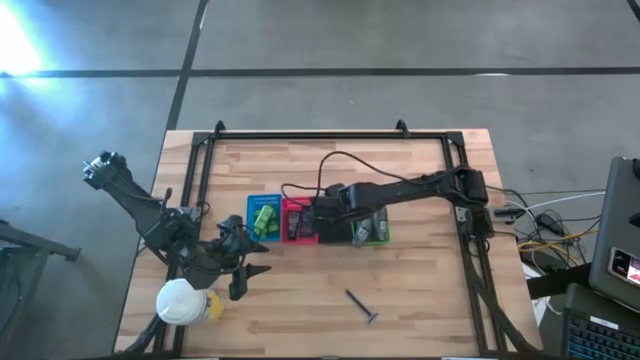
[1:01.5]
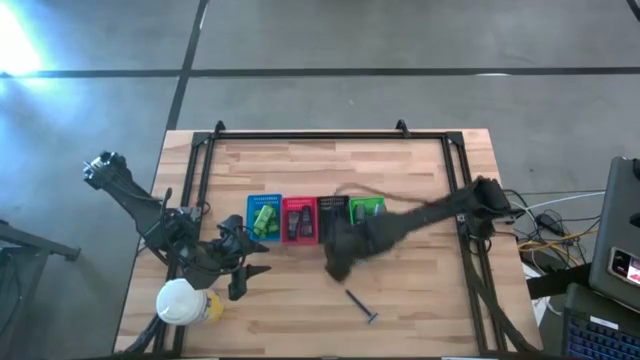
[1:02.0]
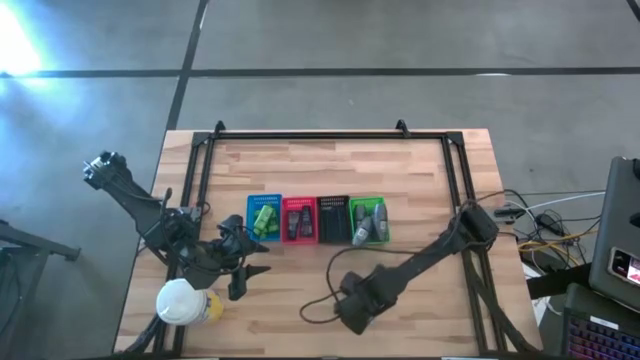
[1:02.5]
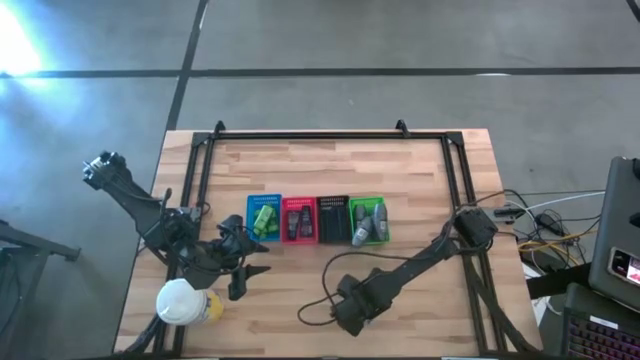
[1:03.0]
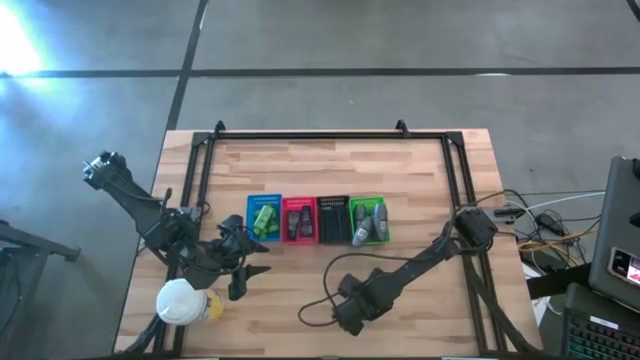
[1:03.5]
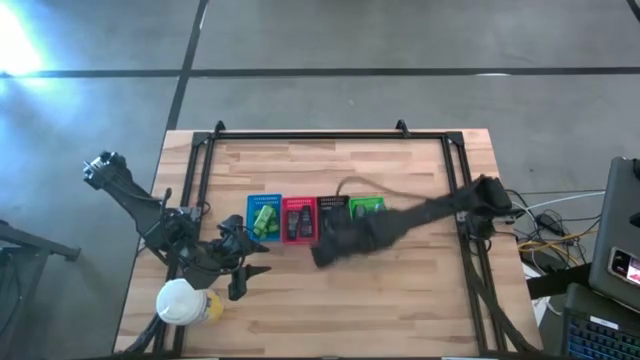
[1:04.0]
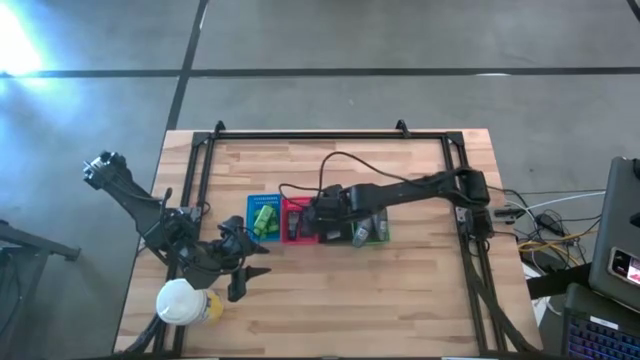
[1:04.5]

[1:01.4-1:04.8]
Task: Pick & Place Travel size toiletries
Put the shaver into the black bin

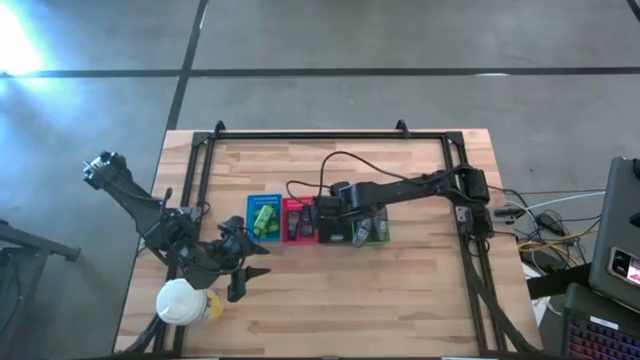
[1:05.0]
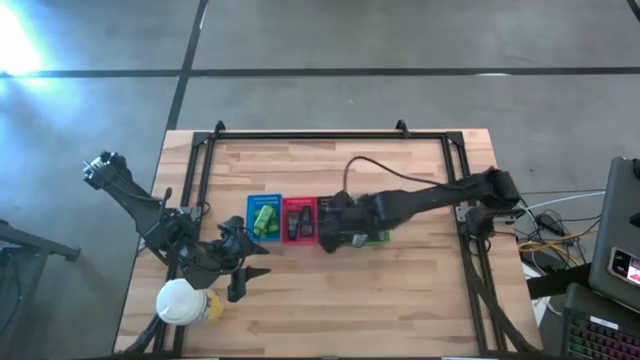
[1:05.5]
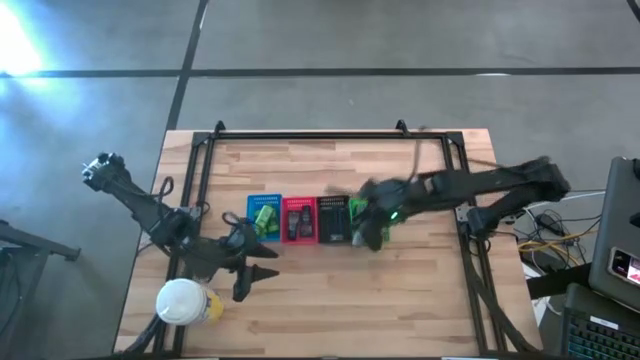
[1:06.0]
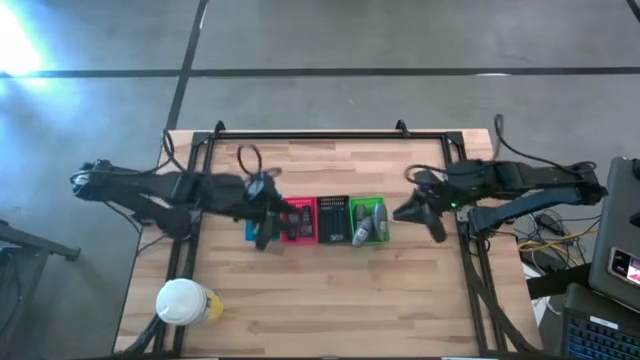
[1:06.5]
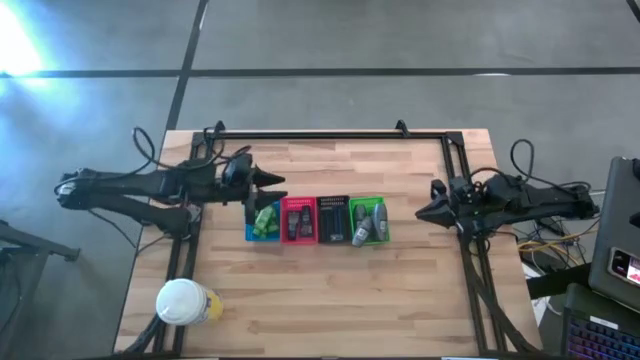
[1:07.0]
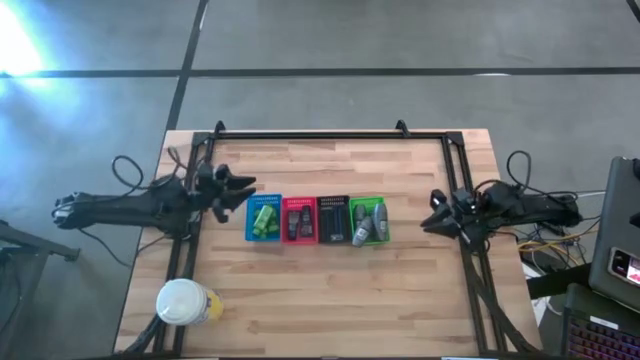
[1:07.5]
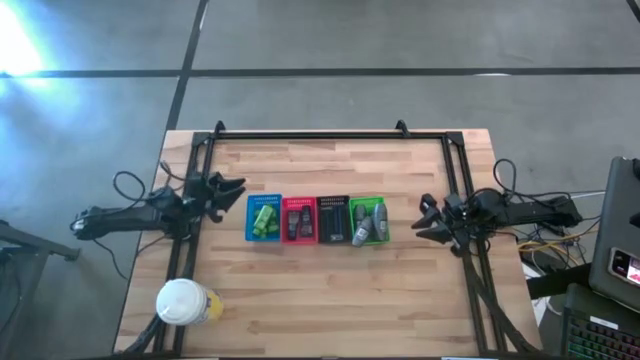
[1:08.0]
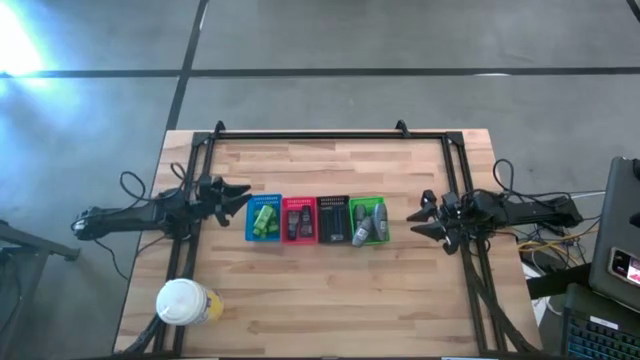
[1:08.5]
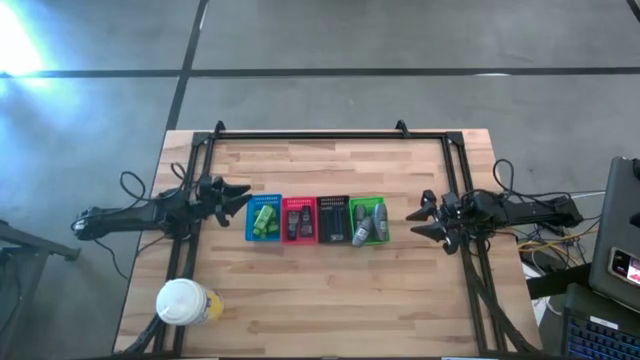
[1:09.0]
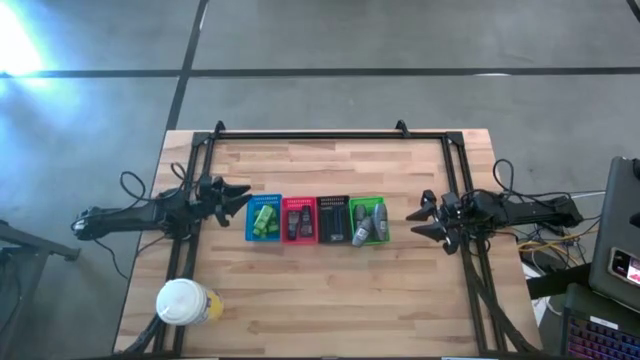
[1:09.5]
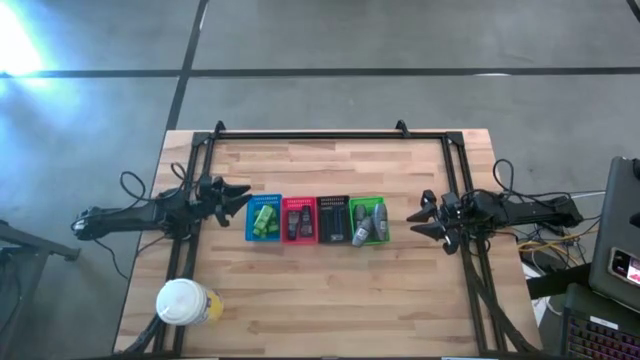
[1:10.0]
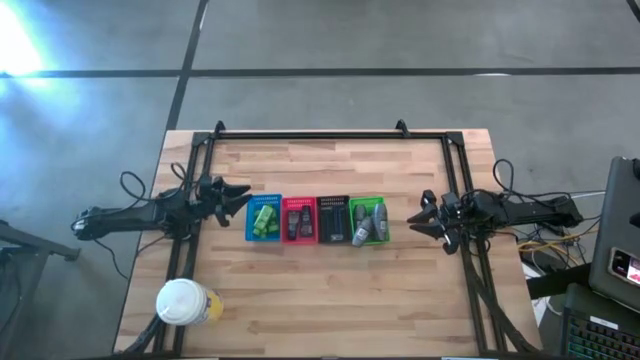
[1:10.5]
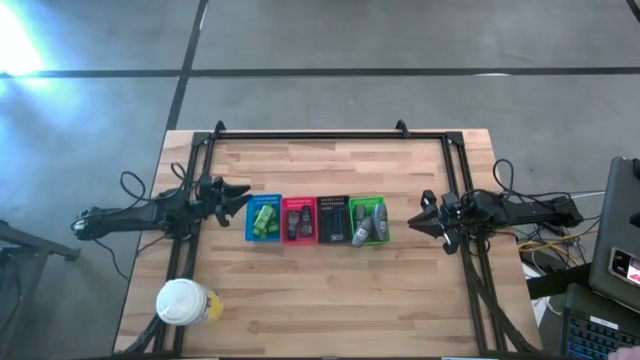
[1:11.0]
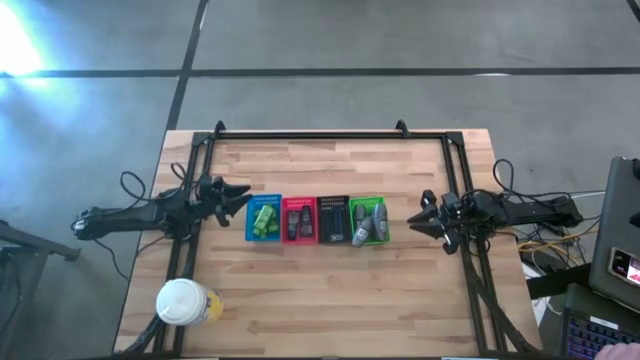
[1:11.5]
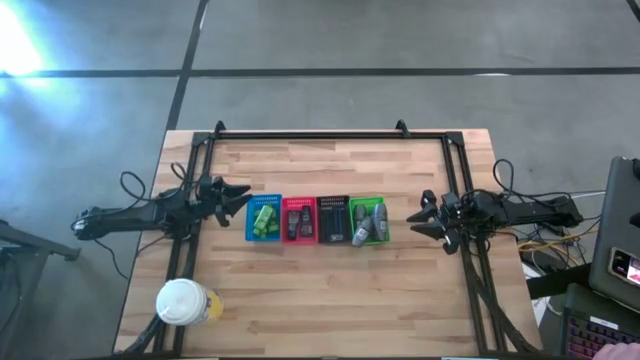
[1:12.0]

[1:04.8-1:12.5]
Return to Home Position

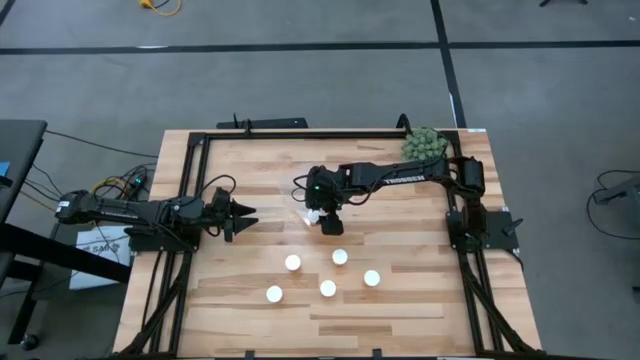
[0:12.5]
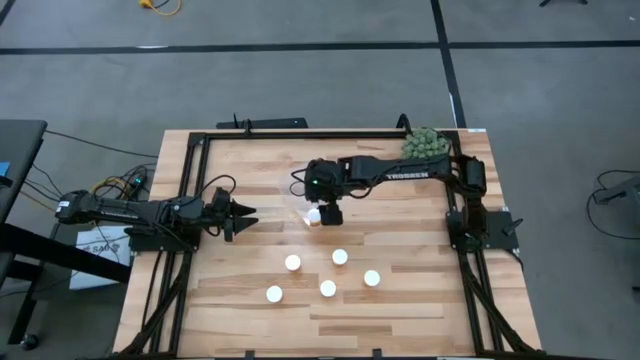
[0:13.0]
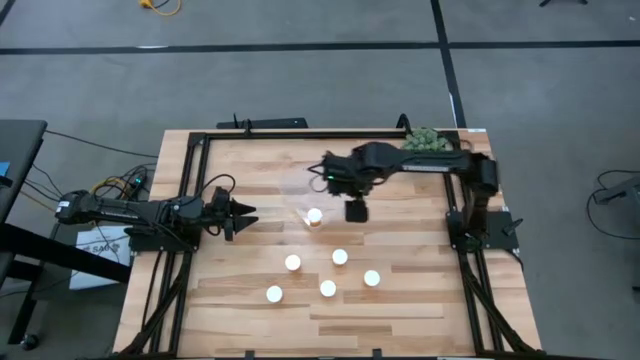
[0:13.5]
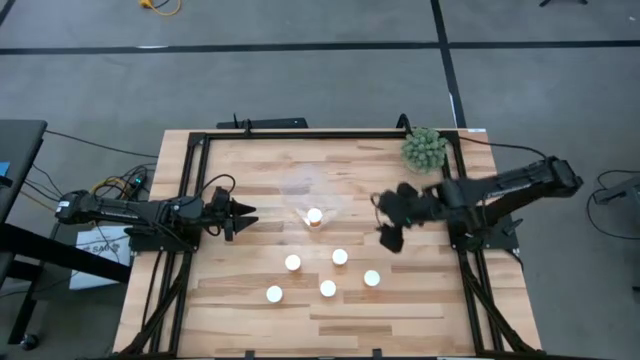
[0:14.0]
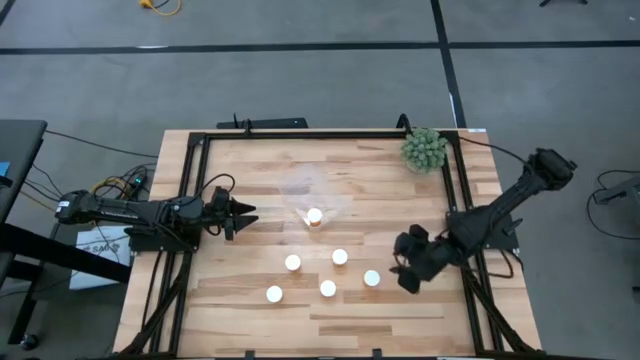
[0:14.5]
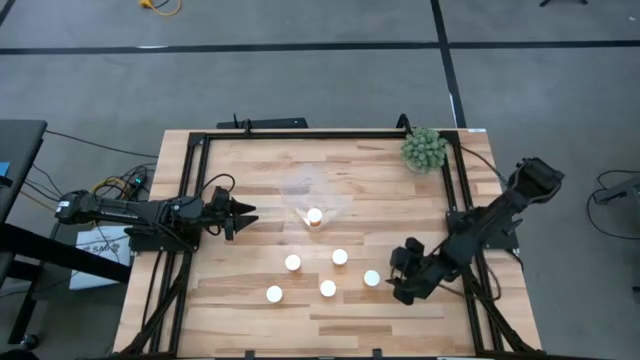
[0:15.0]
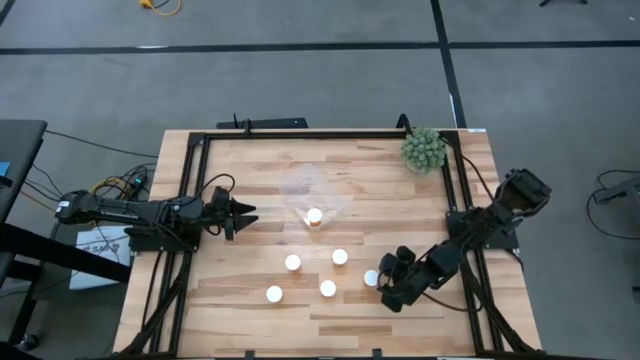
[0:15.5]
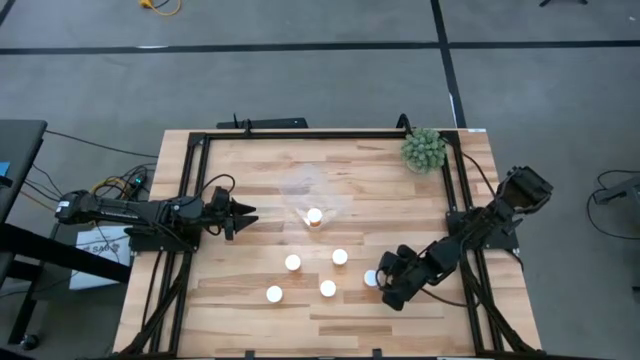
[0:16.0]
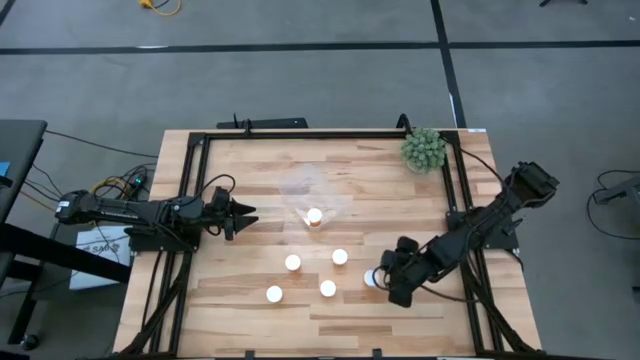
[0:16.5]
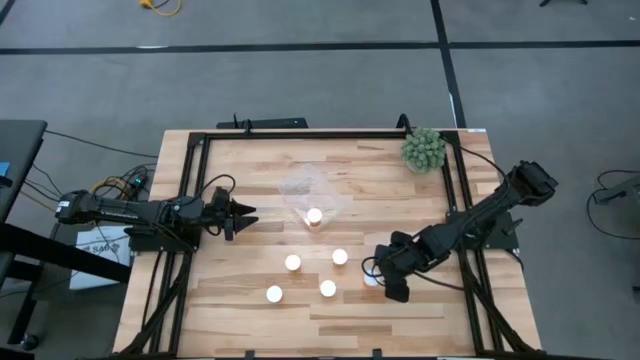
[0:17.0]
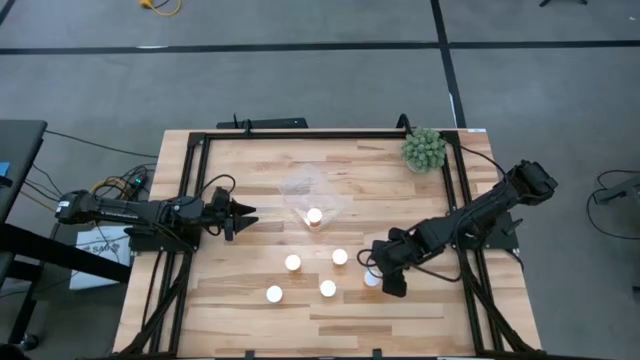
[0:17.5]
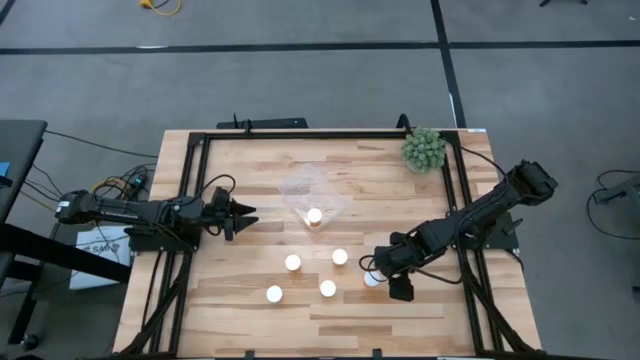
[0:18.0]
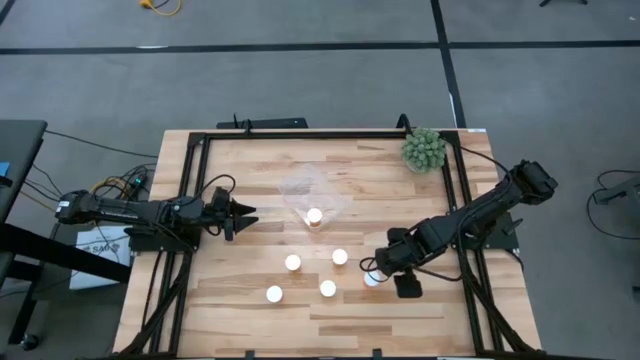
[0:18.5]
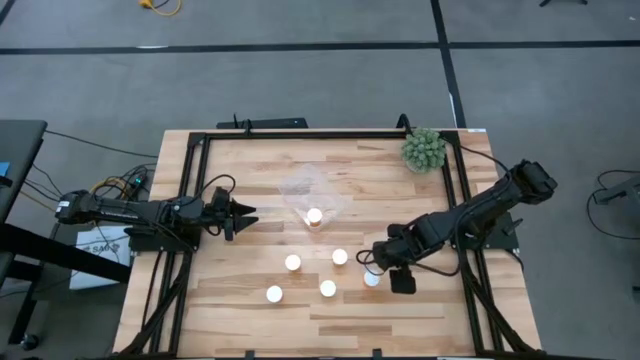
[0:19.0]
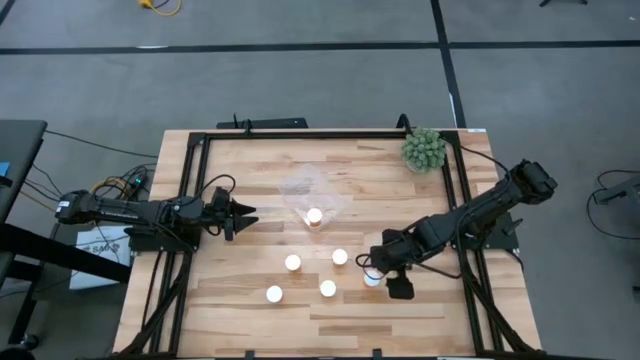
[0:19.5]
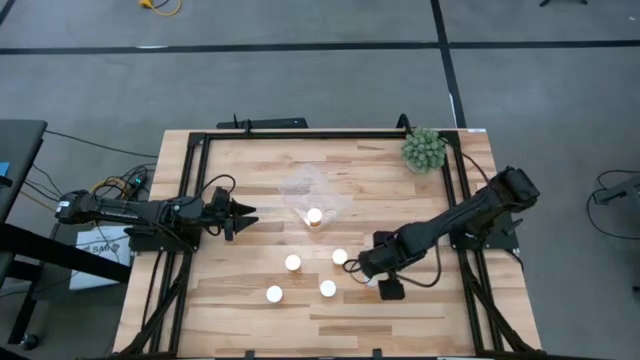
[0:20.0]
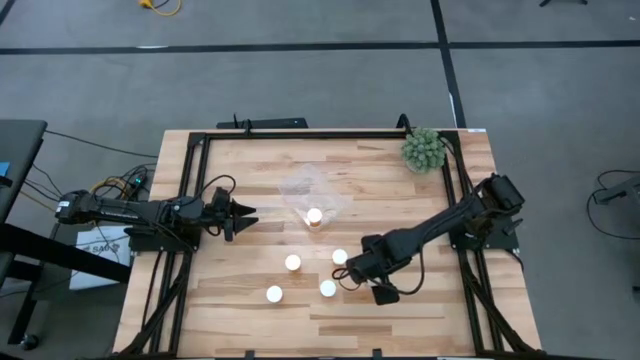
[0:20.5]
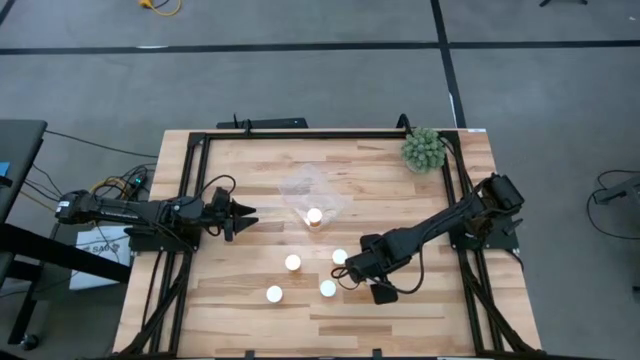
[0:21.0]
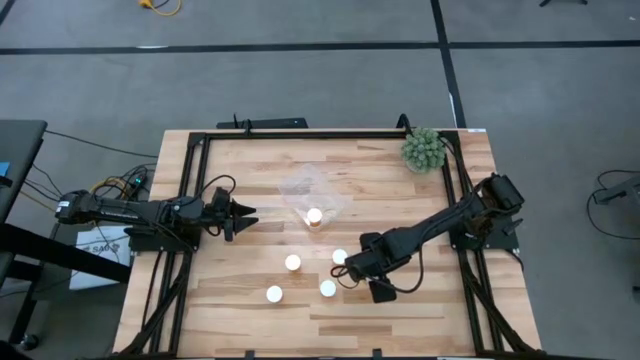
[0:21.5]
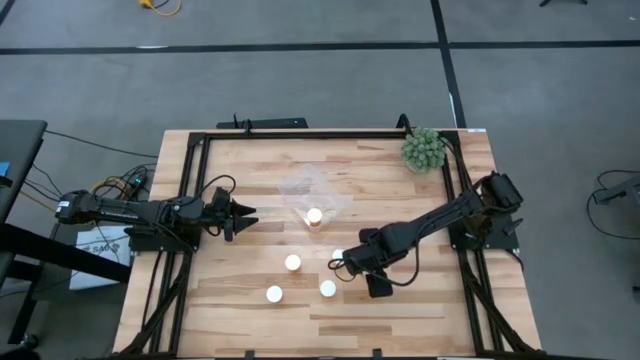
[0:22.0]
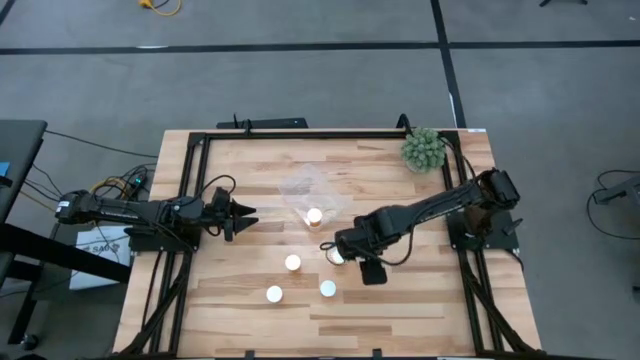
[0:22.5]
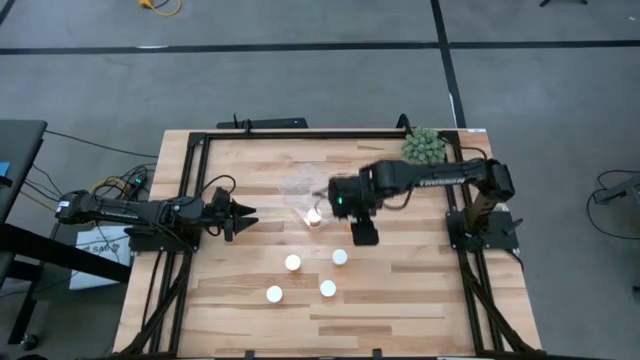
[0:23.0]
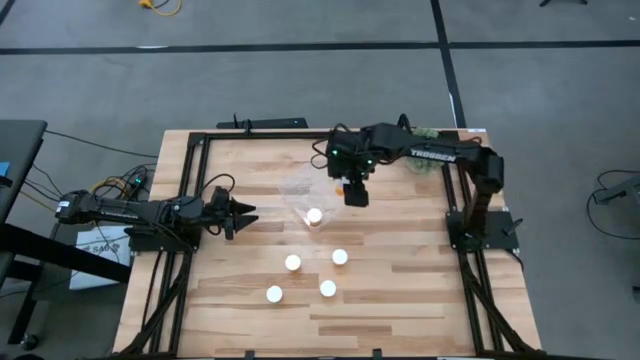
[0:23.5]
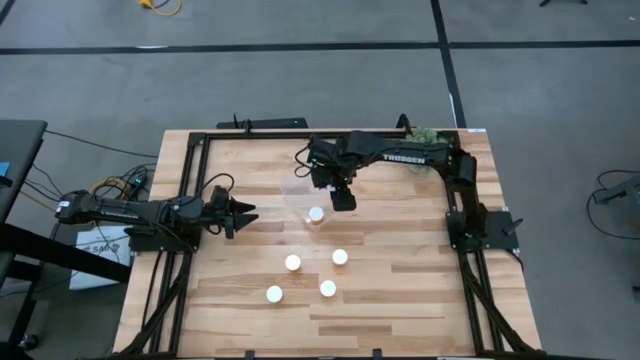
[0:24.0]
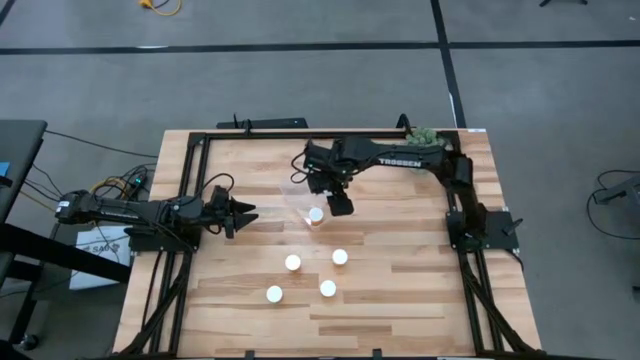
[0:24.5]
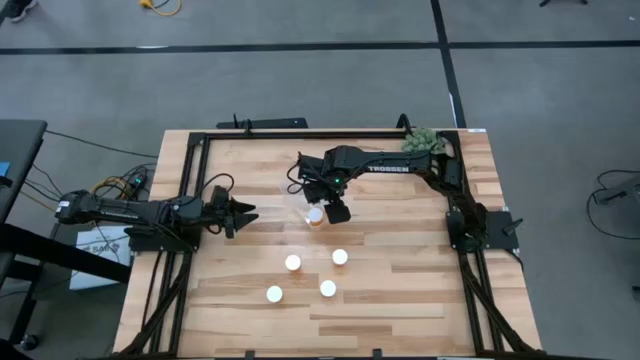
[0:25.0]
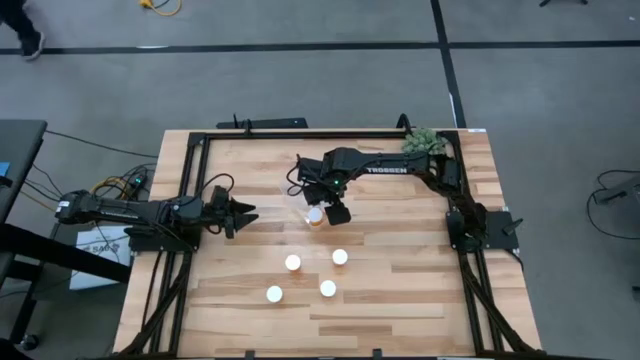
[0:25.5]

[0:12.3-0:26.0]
Task: Pick and place pill bottles into a basket
Put the orange medicine bottle into the transparent bin
